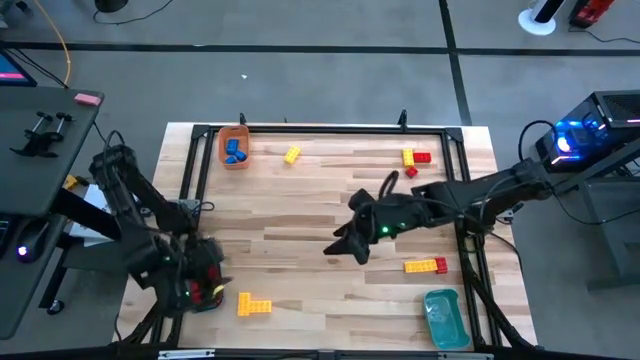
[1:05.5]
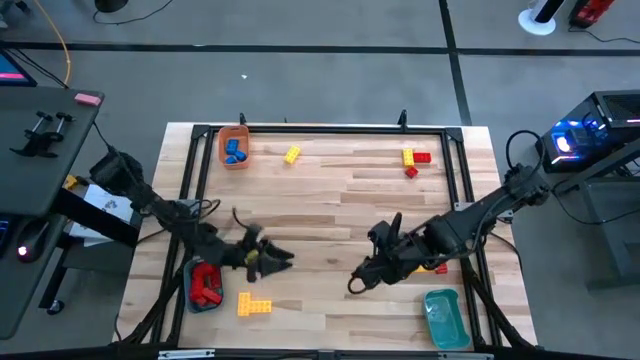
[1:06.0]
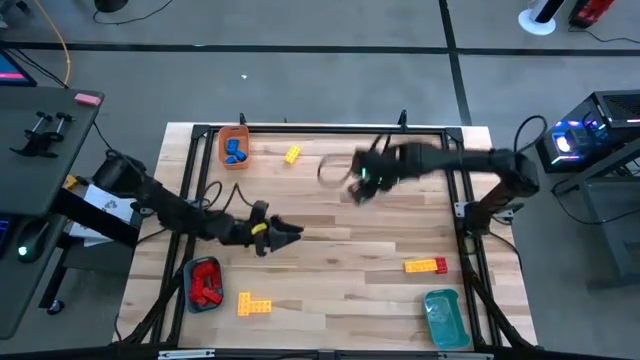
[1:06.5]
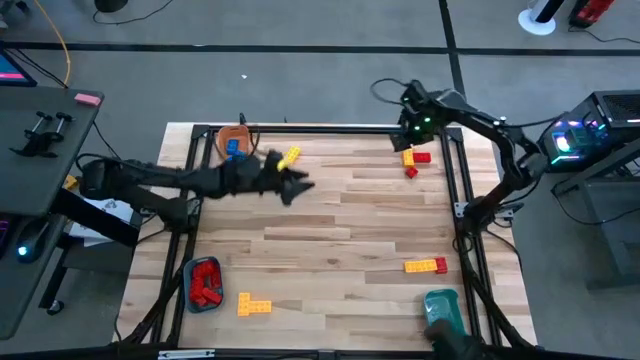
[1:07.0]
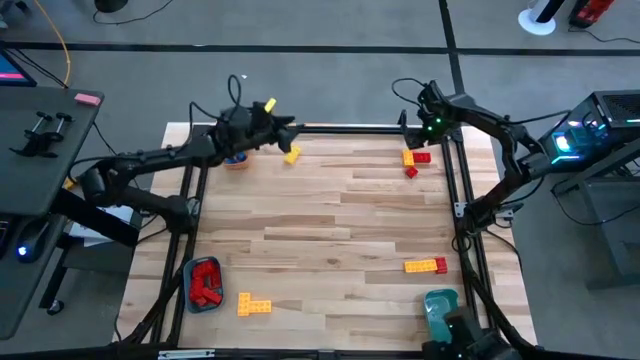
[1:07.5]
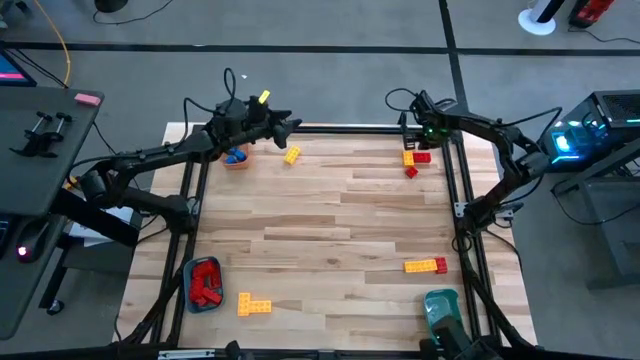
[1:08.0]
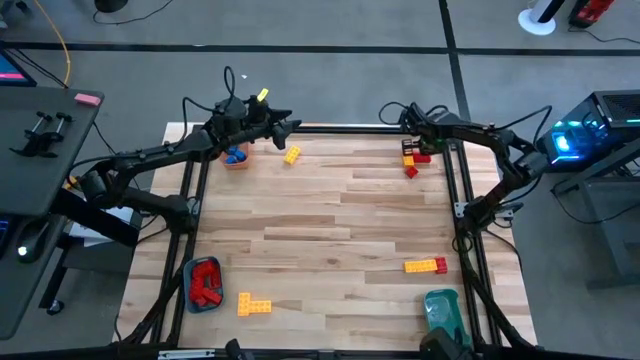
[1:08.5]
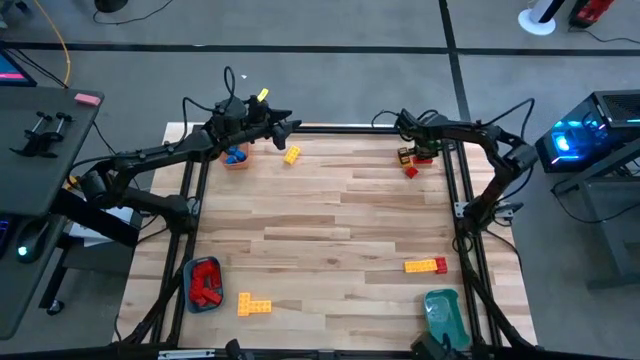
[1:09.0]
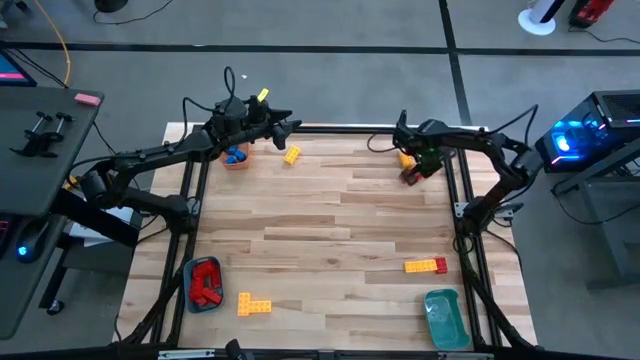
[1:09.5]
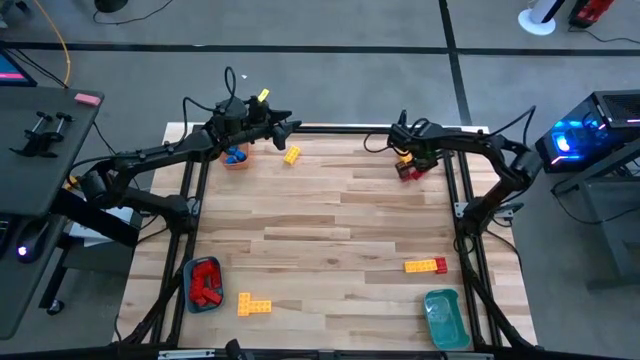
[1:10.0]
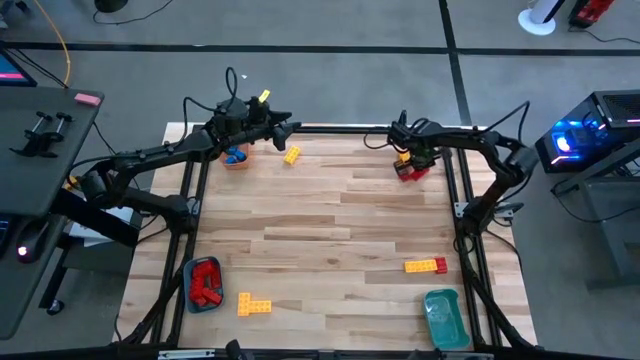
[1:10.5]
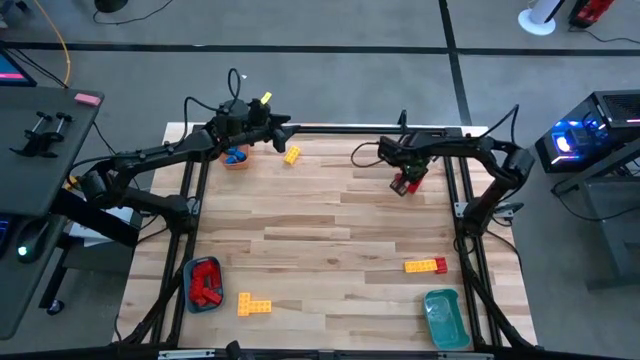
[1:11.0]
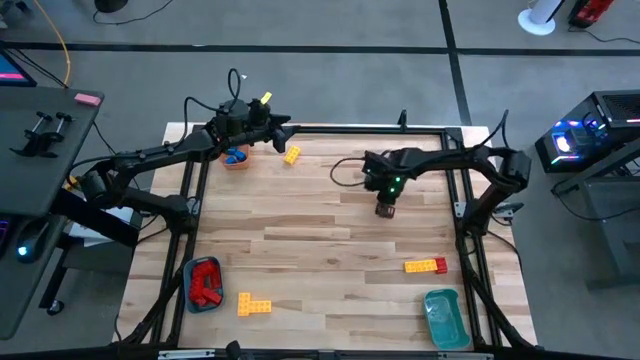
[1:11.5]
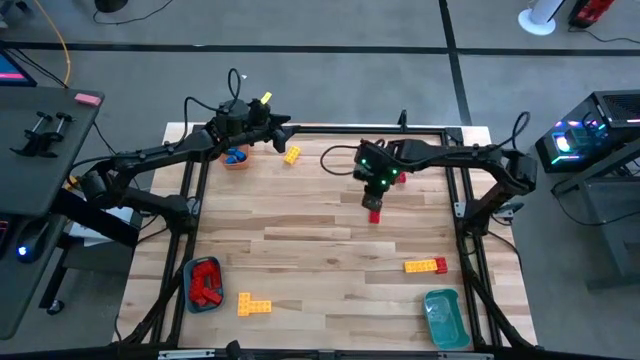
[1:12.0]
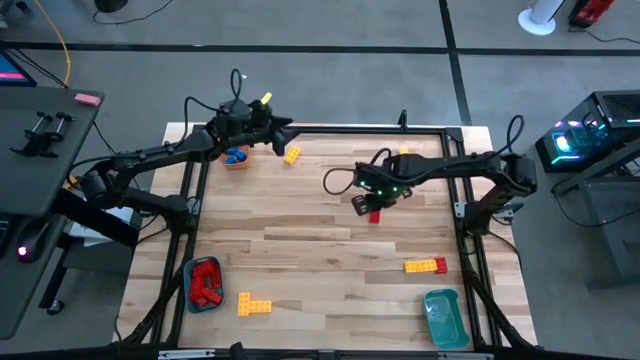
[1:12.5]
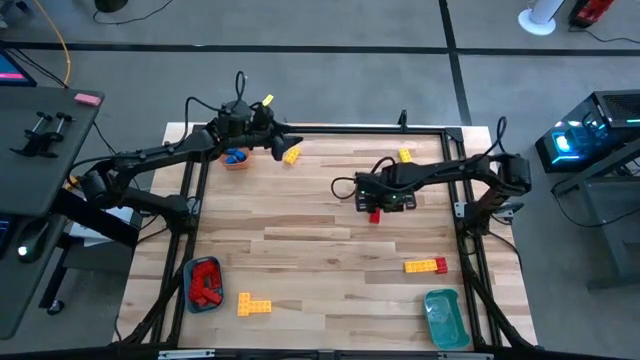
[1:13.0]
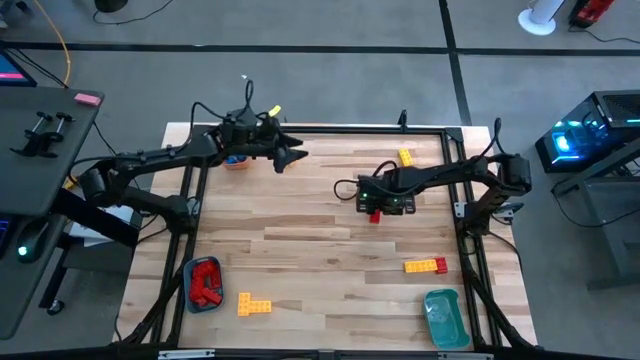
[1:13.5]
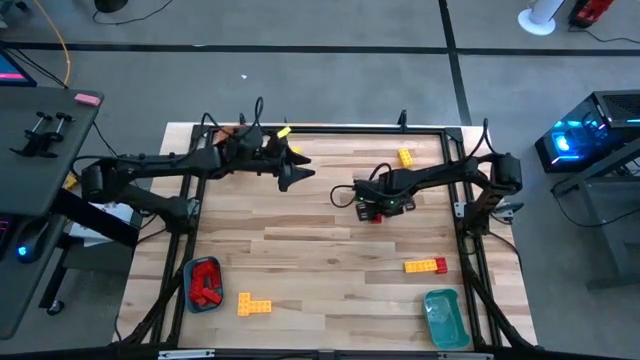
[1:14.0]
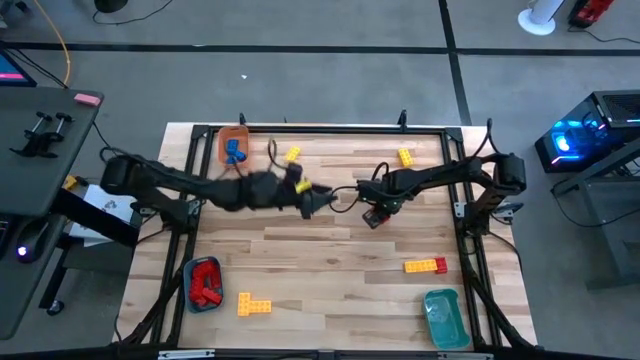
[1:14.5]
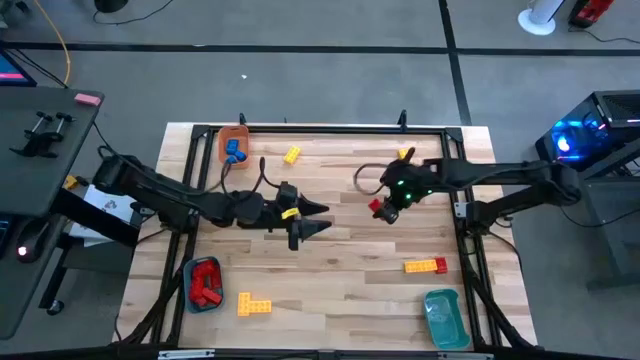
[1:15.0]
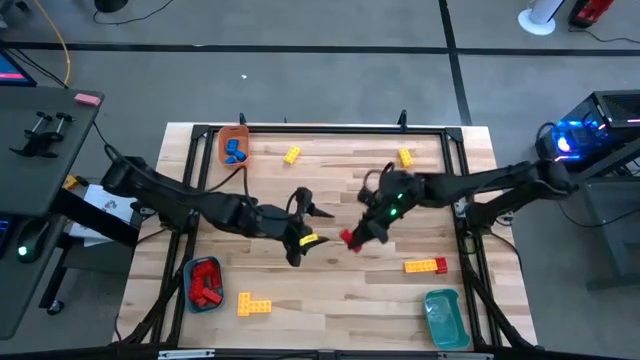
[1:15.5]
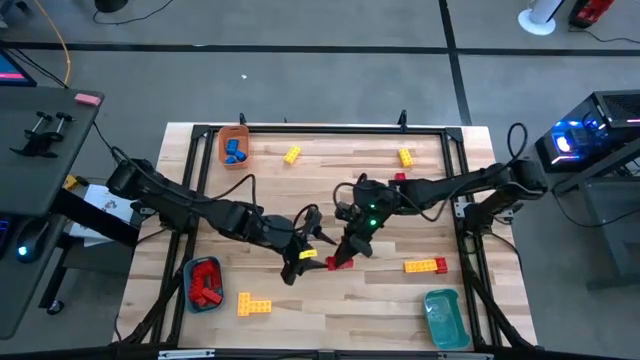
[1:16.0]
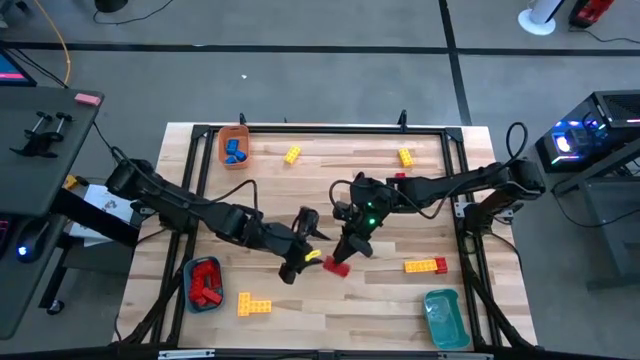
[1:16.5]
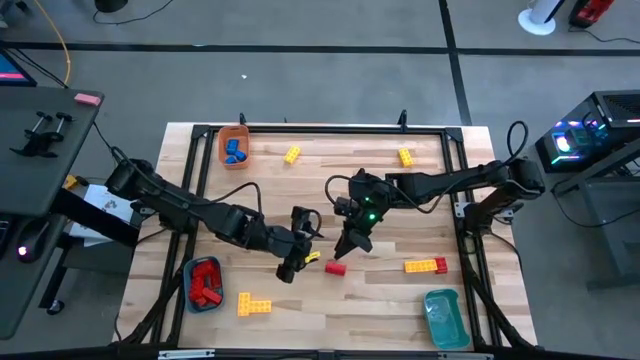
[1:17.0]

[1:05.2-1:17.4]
Task: Sort blocks
Put the red game piece into the bottom left blue bin

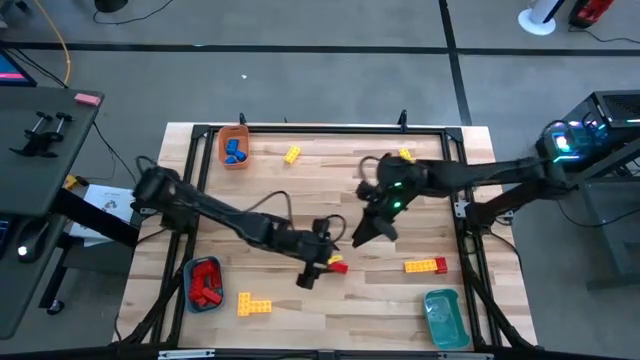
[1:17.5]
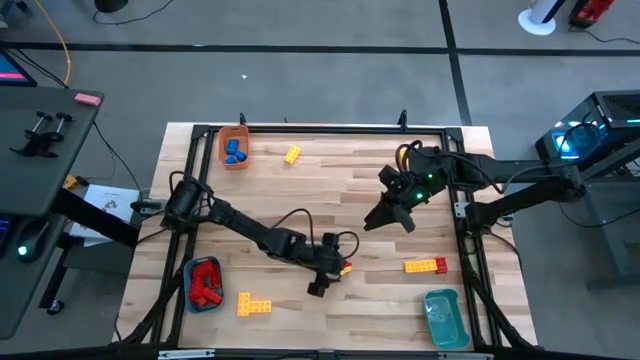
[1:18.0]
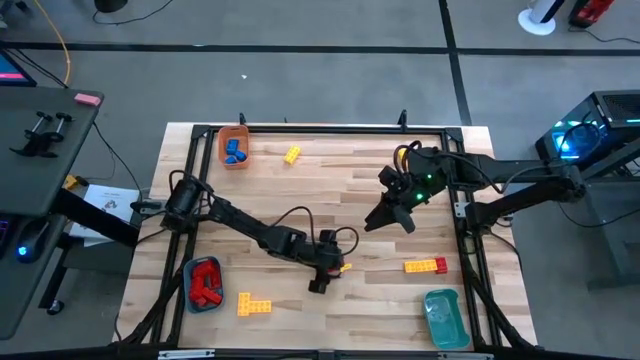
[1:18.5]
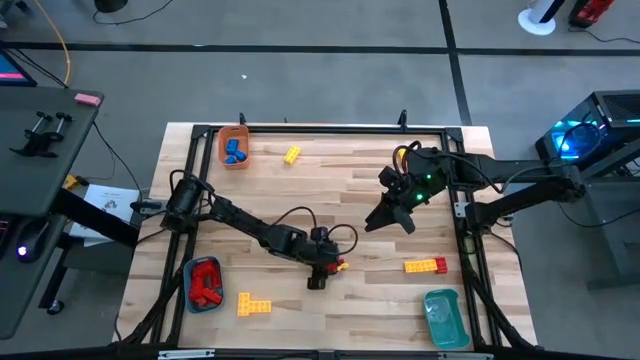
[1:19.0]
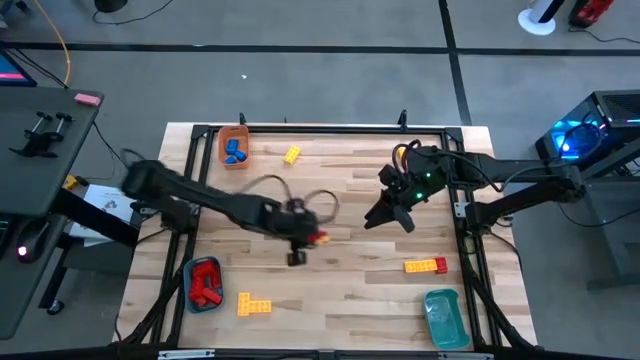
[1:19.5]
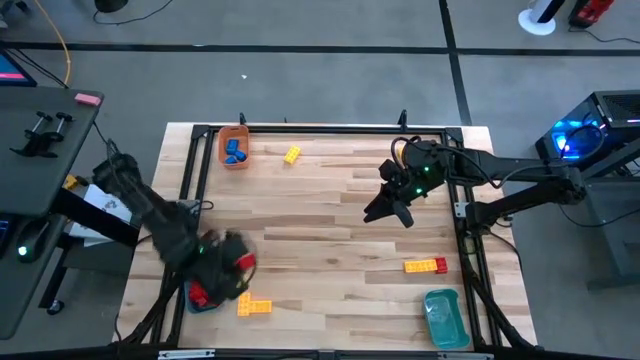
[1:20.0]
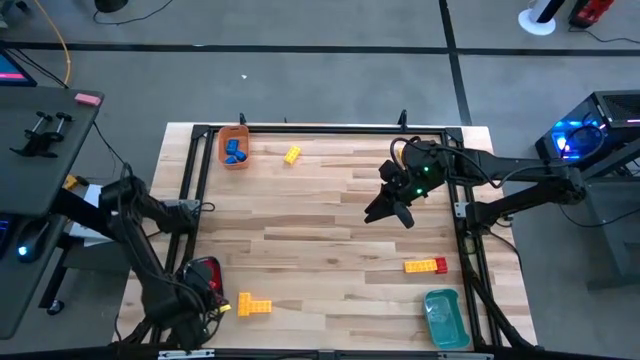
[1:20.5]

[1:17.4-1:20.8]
Put the red game piece into the bottom left blue bin

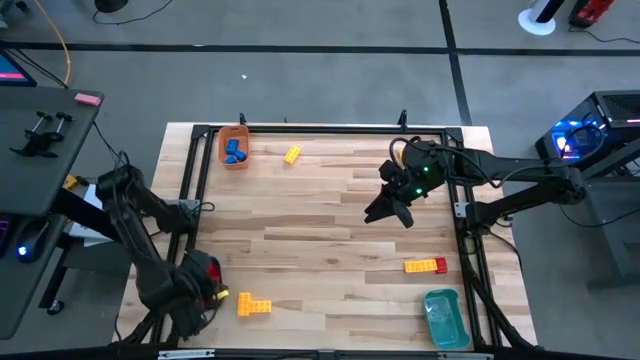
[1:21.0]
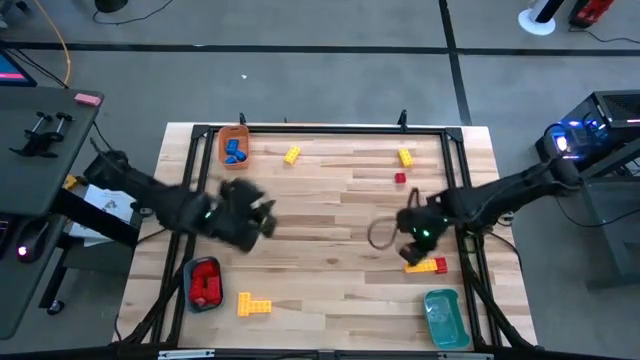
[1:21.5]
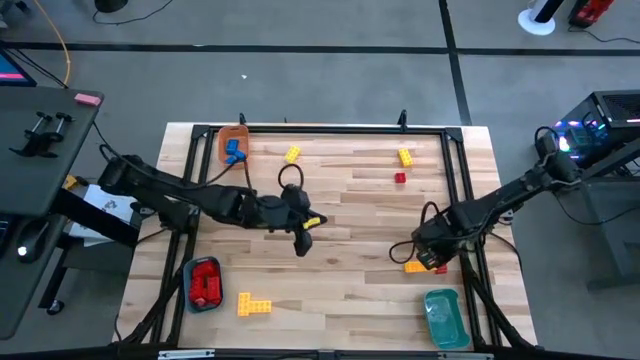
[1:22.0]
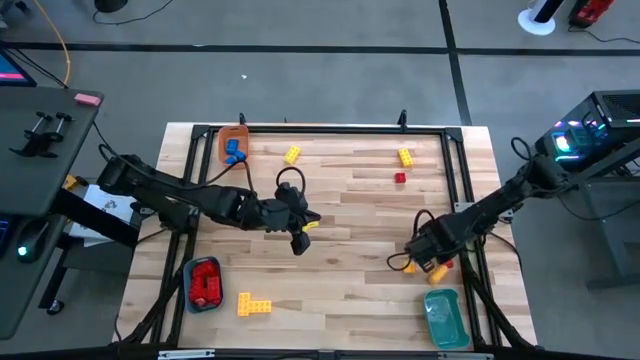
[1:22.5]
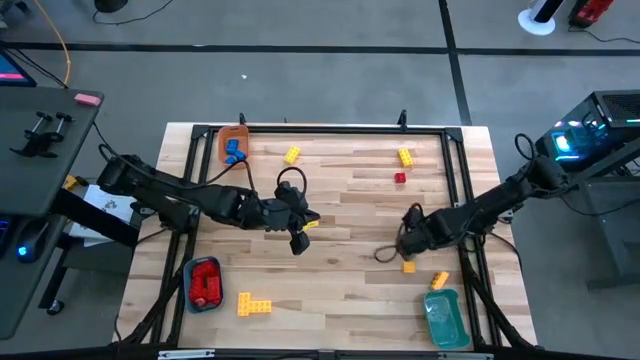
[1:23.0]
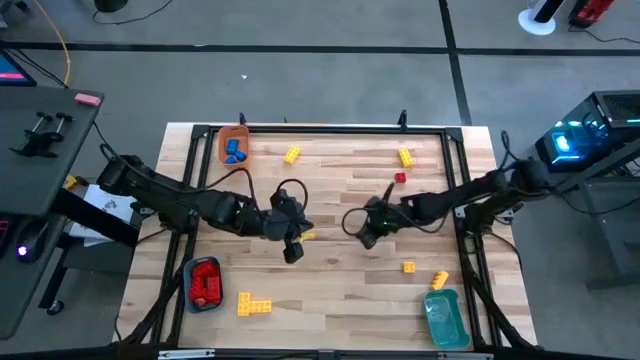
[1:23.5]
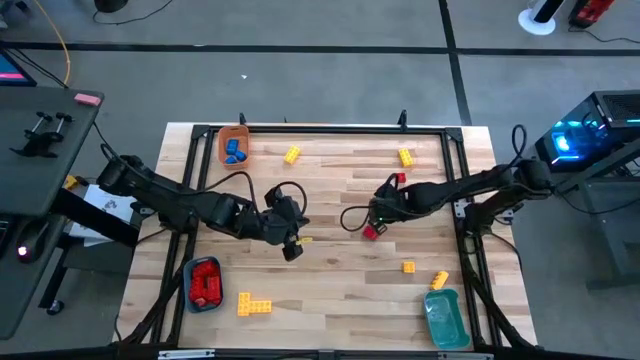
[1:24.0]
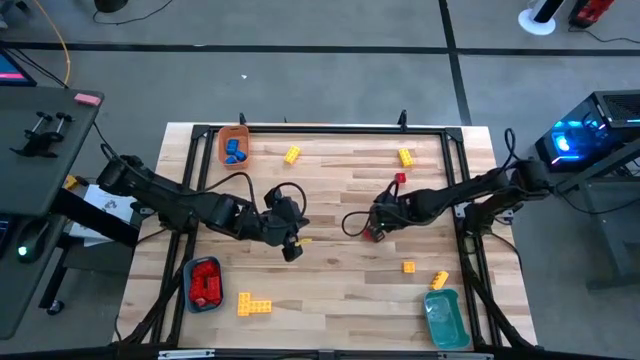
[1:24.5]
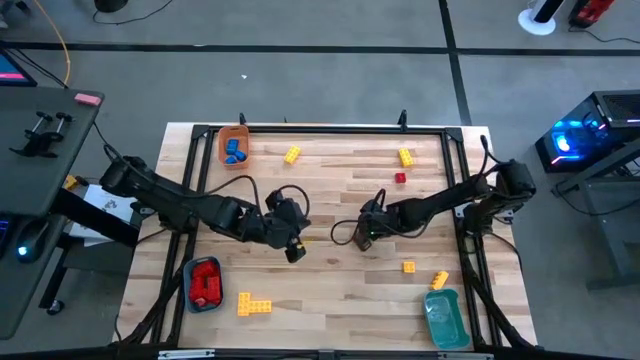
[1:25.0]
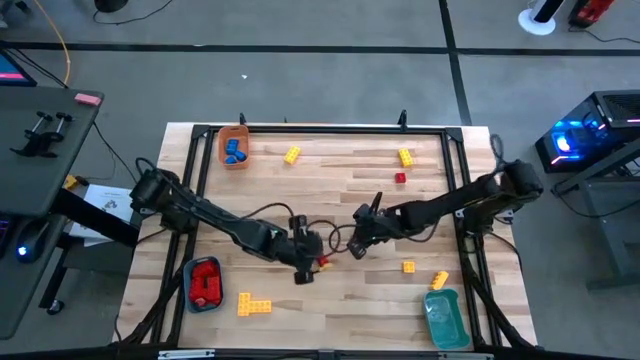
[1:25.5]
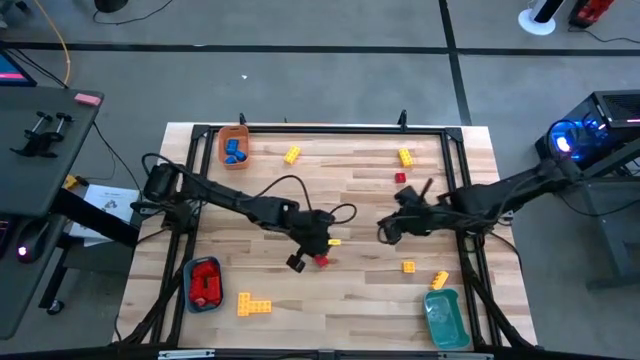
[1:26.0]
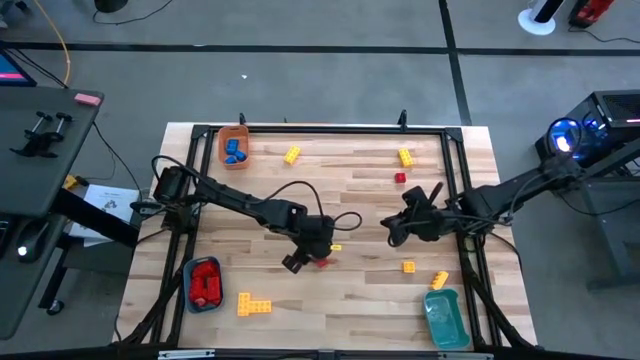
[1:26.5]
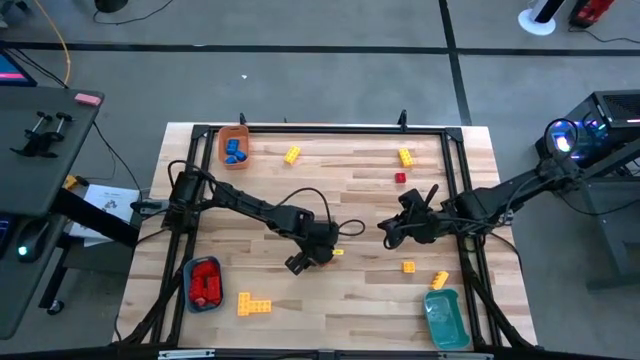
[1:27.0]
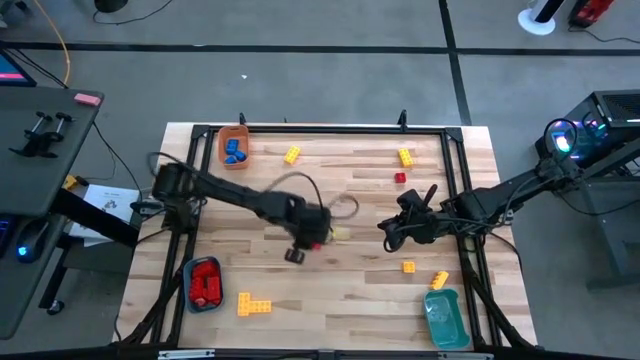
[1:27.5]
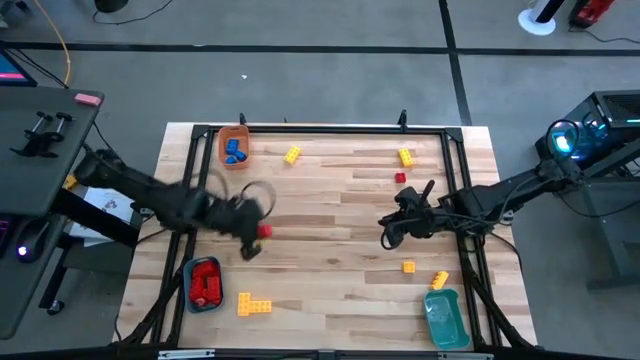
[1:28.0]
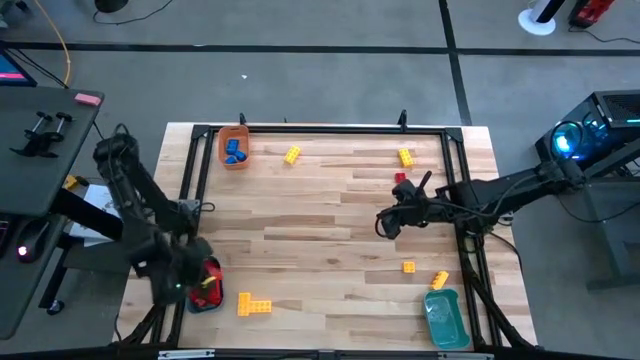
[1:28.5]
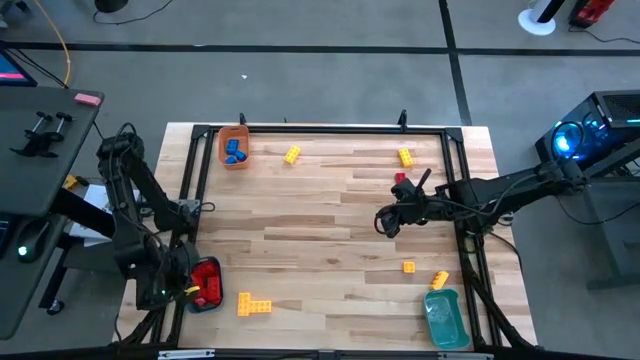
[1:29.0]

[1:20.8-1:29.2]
Put the red game piece into the bottom left blue bin
